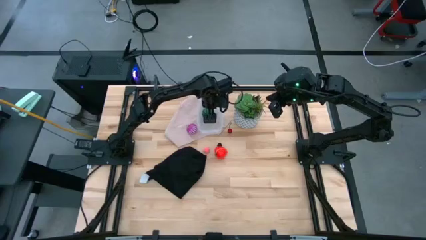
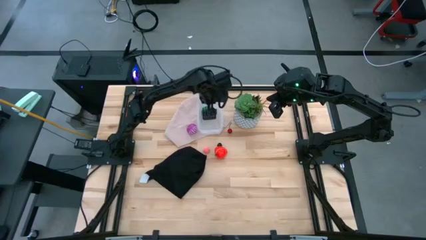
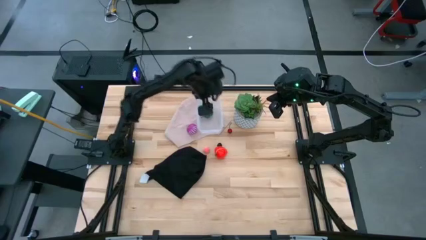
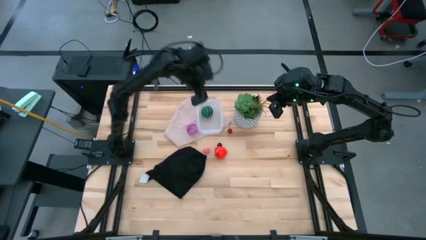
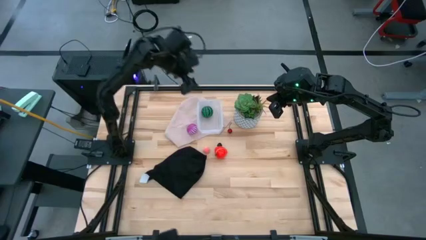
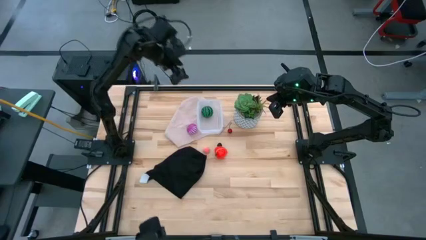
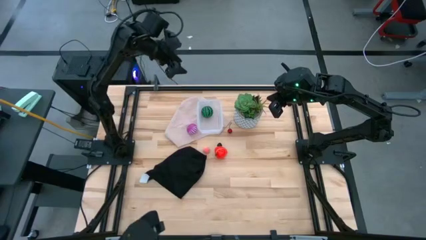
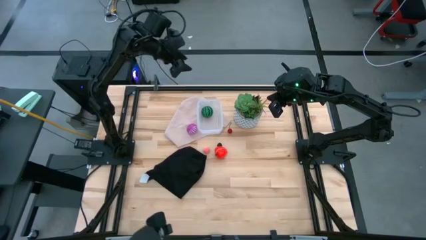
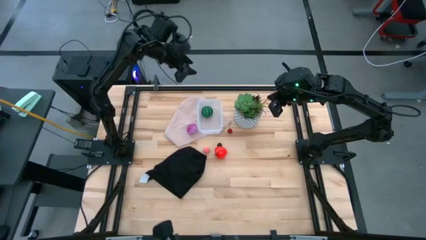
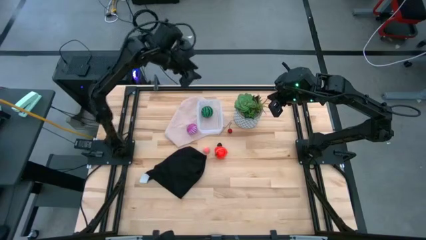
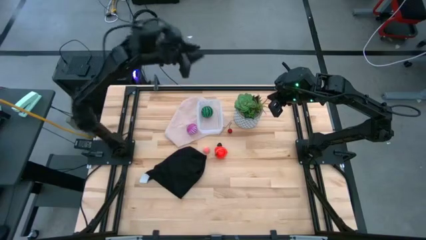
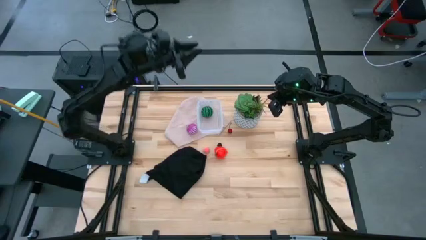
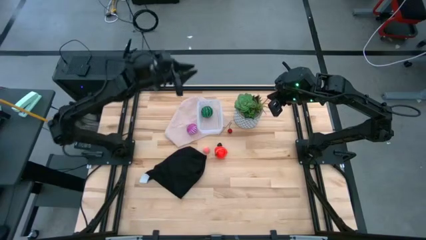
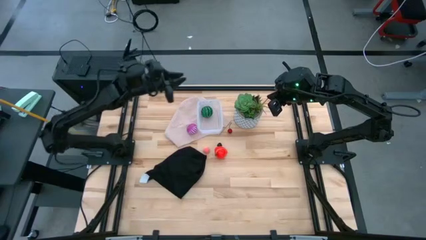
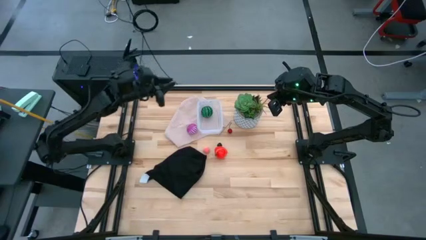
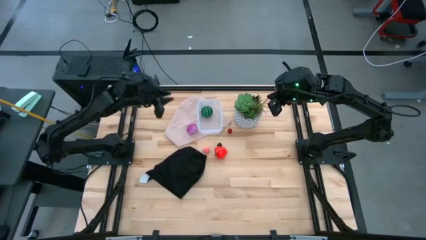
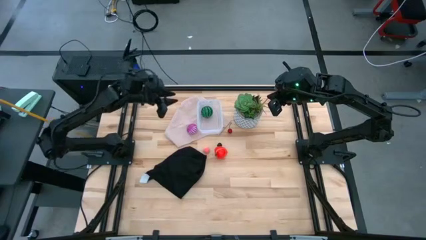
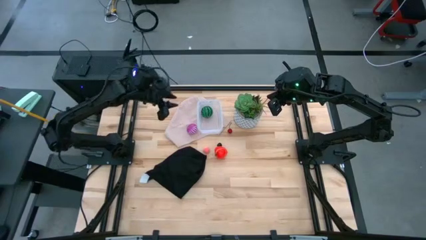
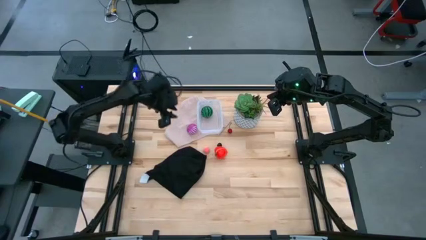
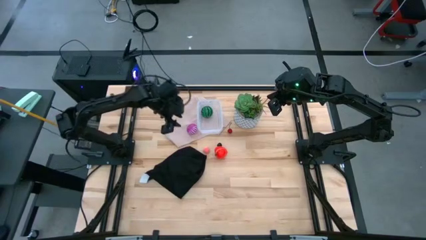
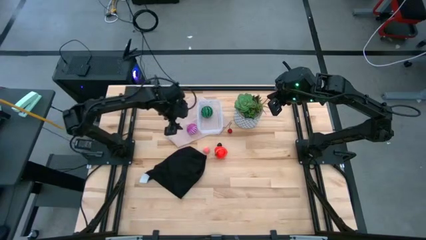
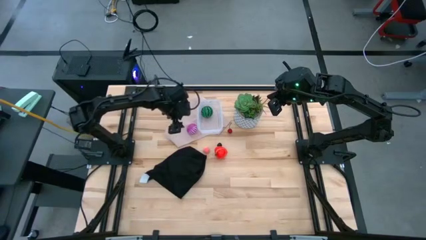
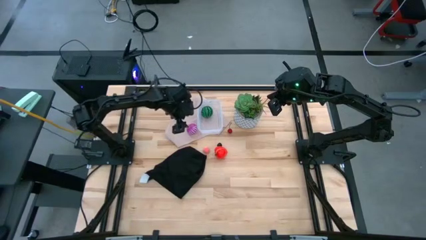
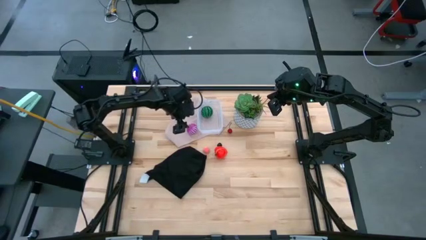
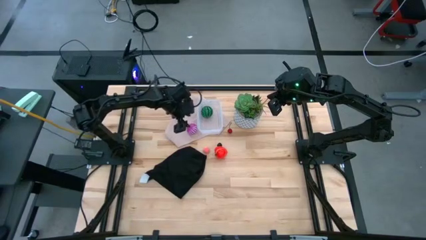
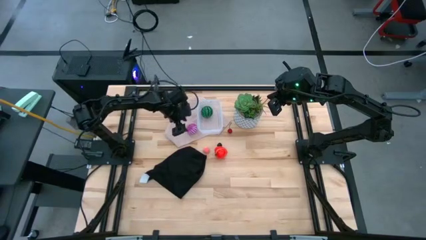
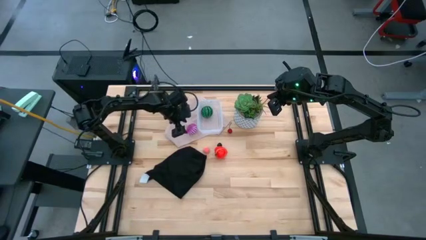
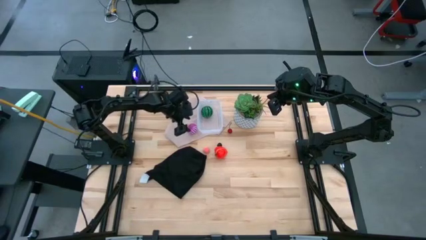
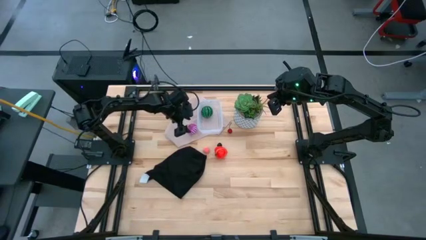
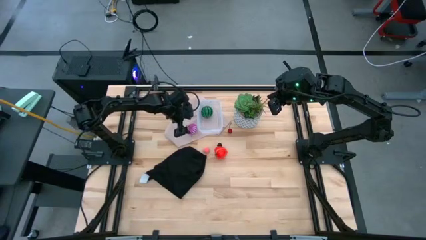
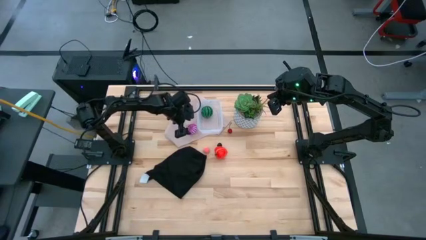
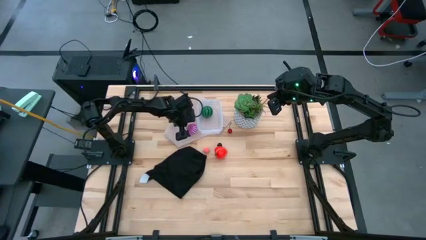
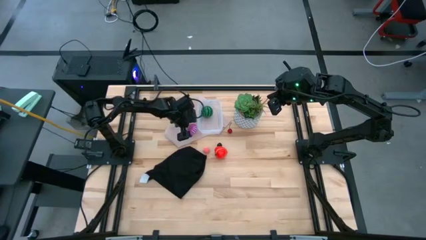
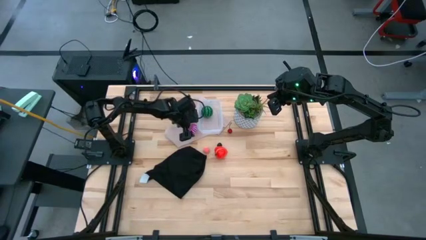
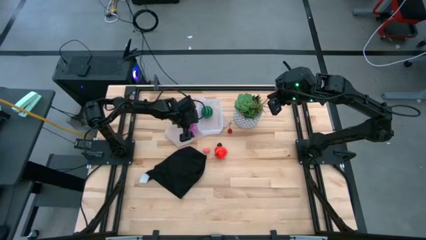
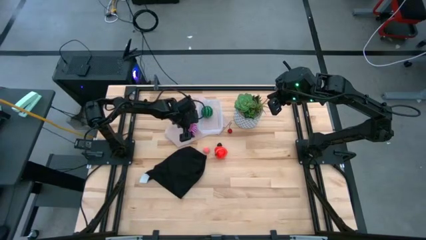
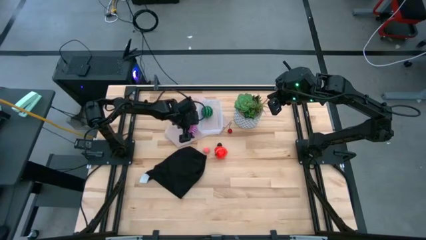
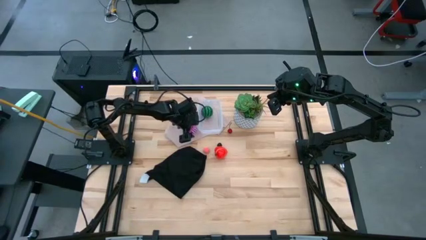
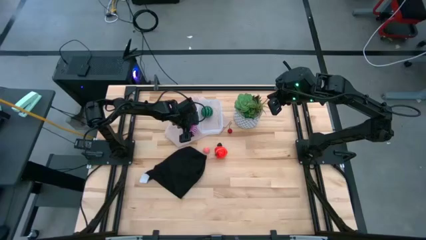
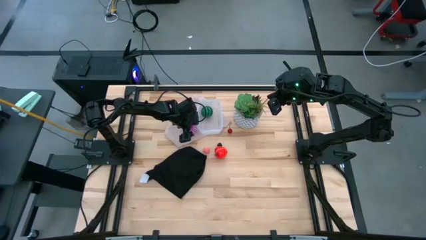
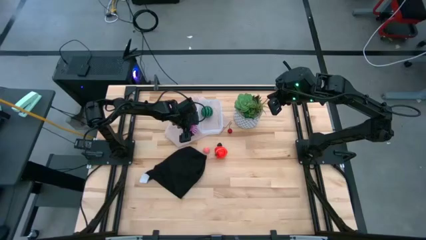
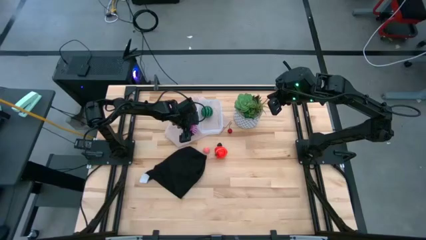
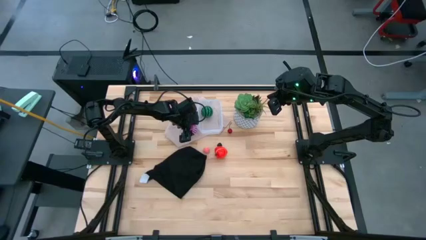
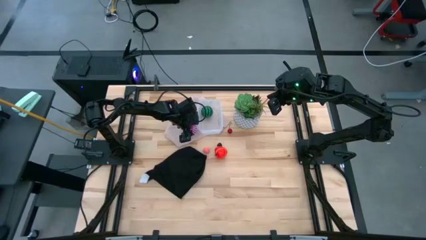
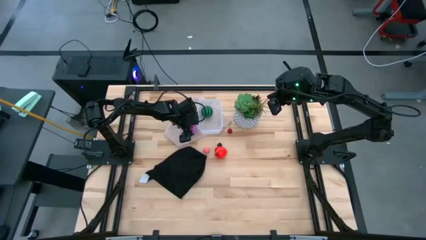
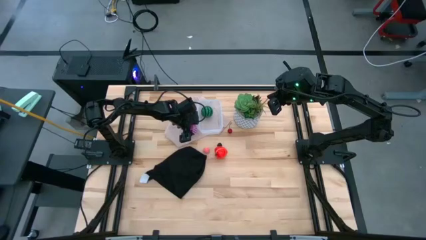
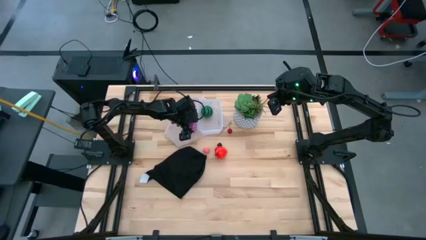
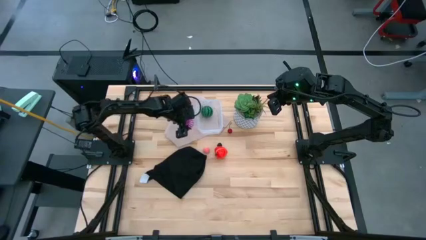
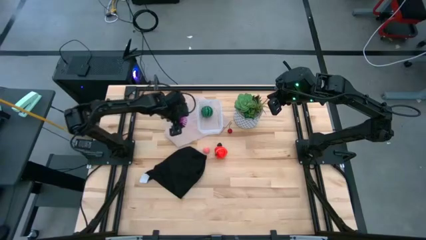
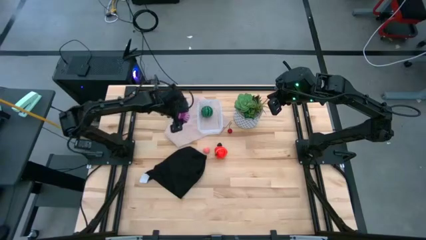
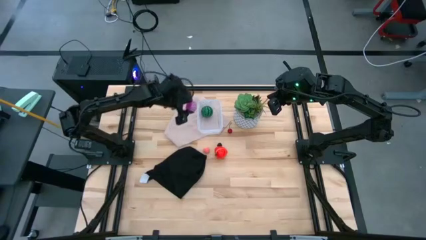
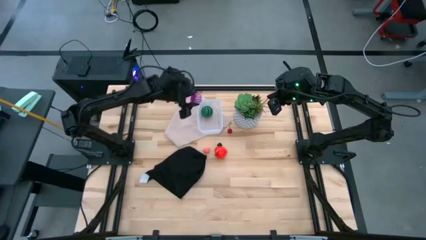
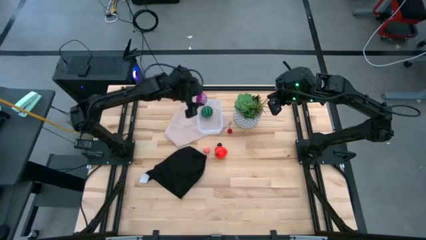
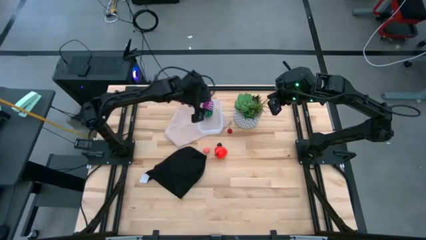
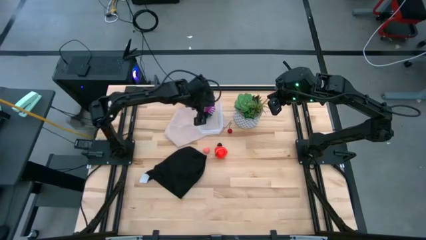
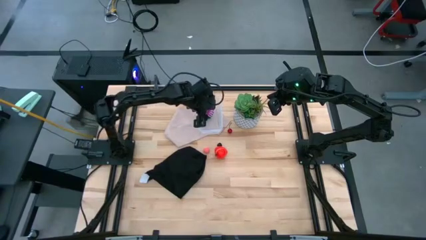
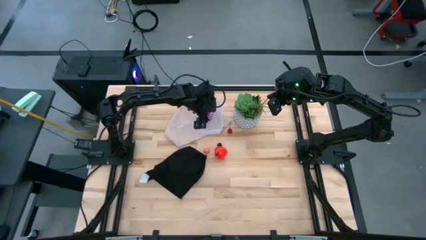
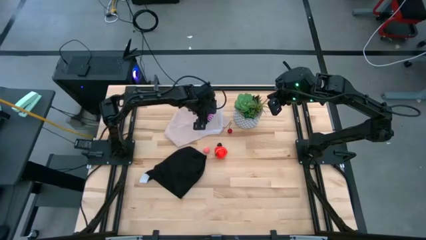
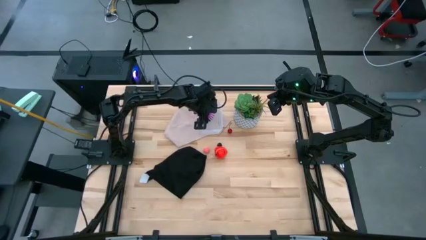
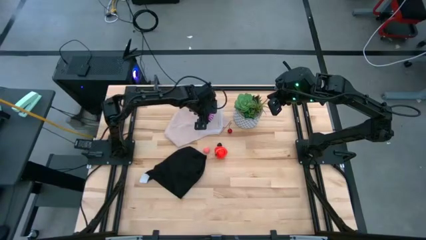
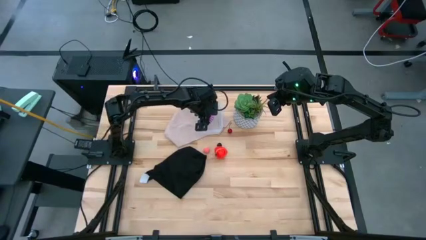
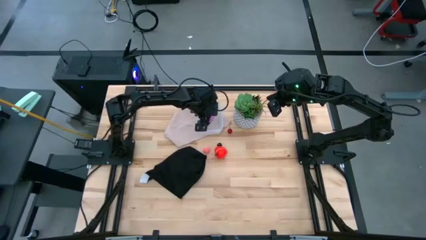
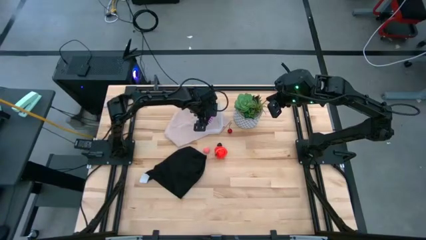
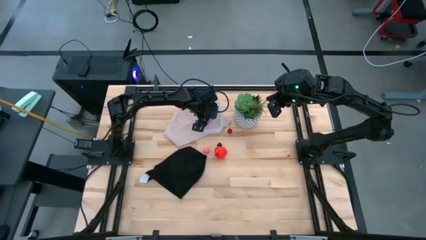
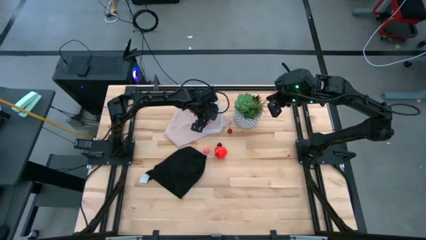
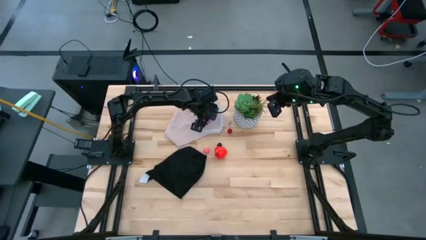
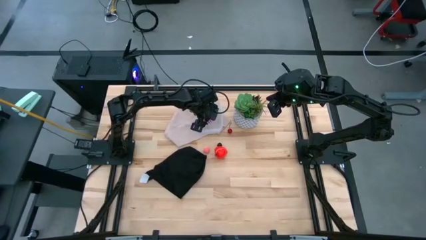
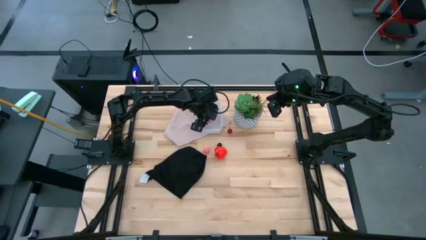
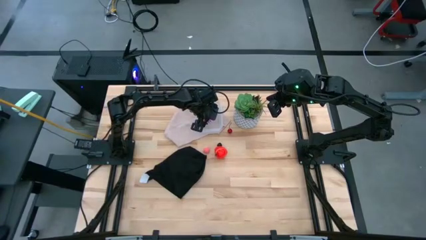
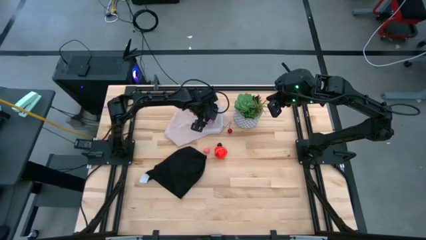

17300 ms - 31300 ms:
Task: Pick and placing Produce into tupperware
Put the onion into the transparent bin
